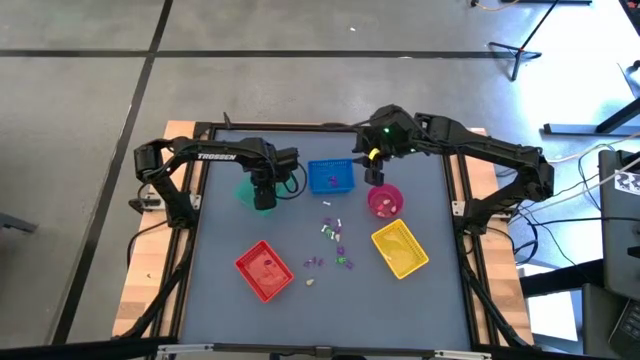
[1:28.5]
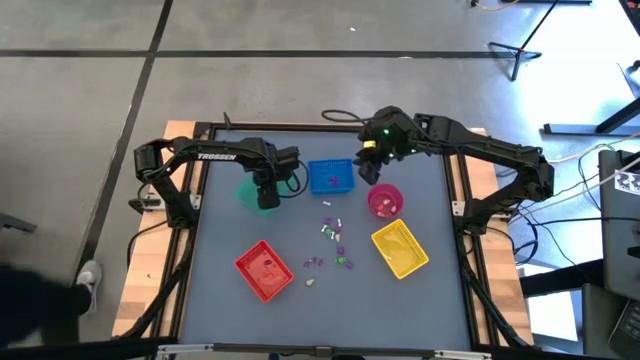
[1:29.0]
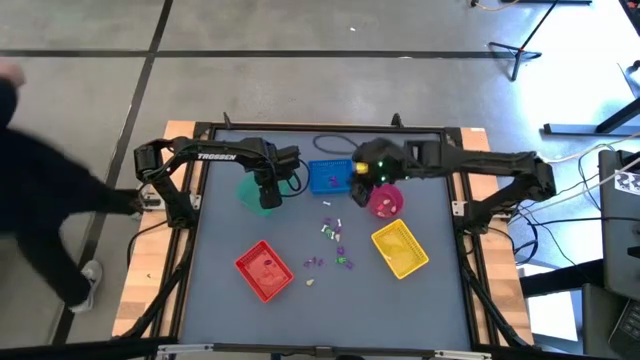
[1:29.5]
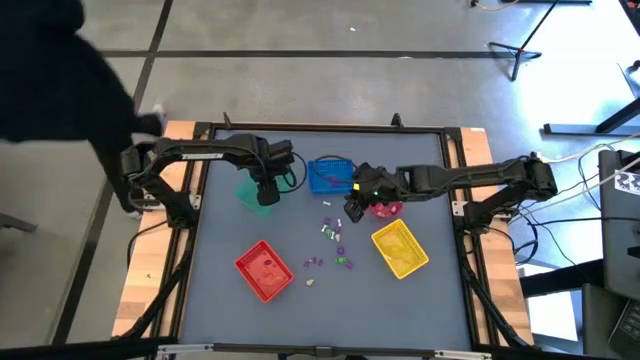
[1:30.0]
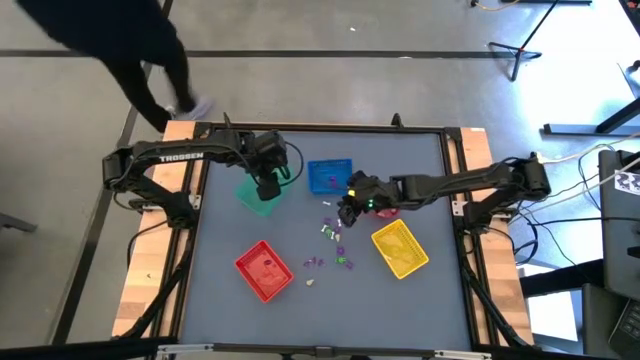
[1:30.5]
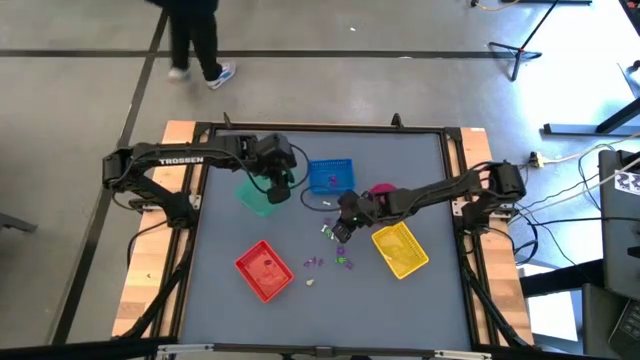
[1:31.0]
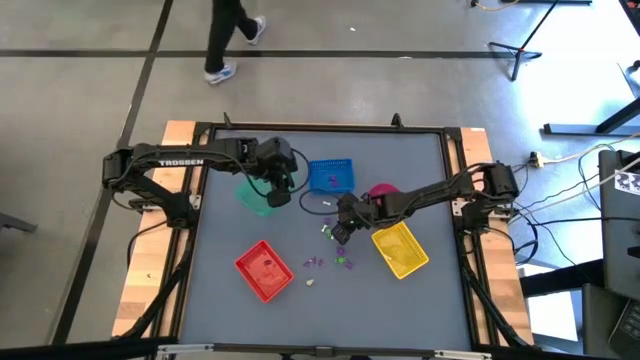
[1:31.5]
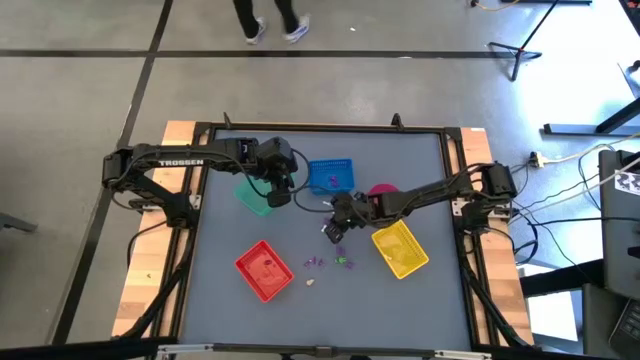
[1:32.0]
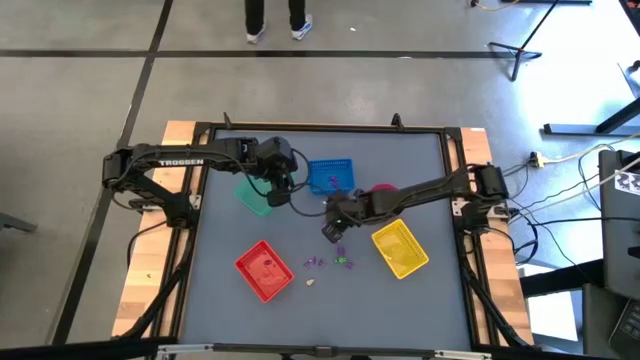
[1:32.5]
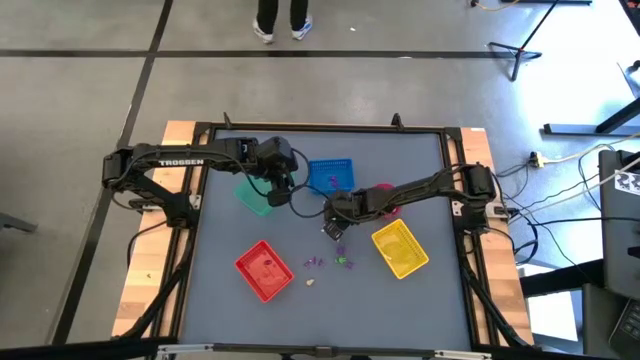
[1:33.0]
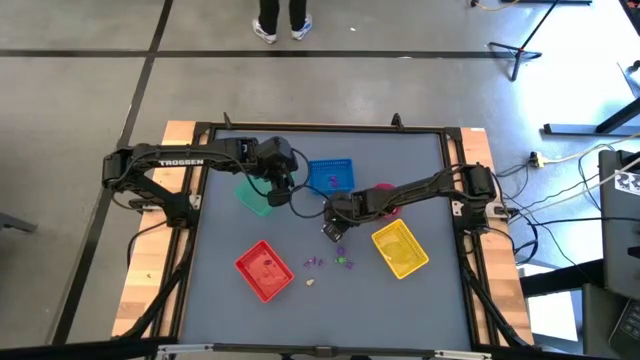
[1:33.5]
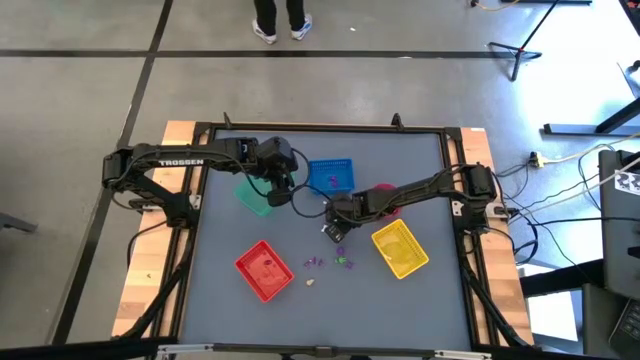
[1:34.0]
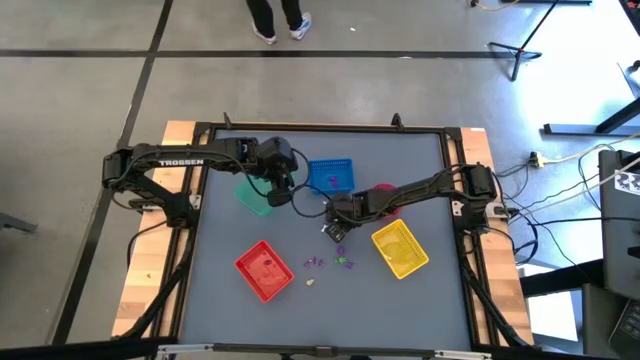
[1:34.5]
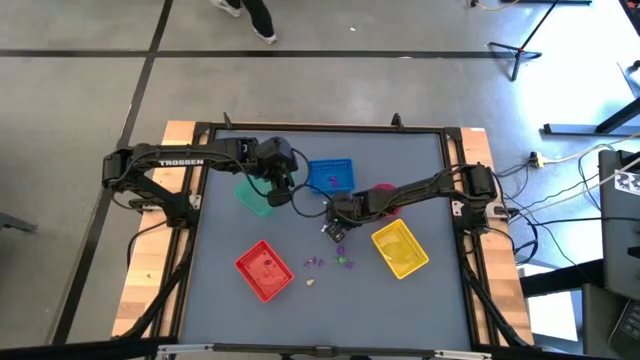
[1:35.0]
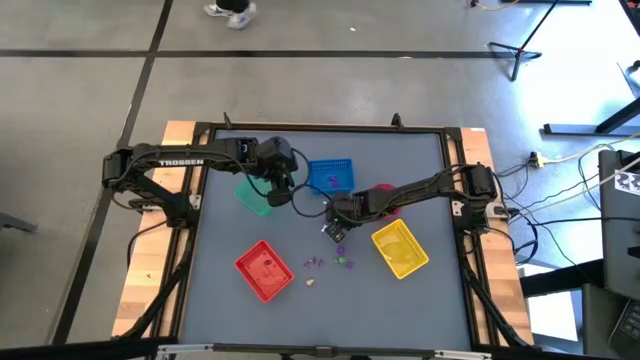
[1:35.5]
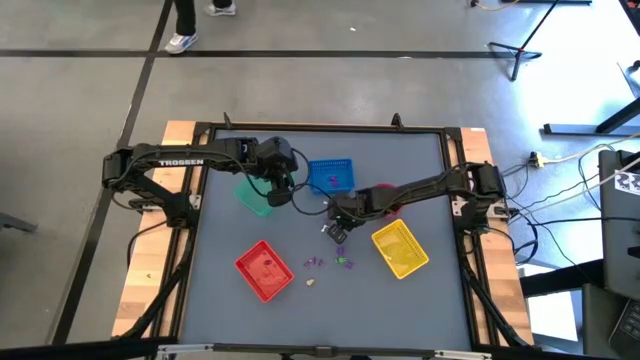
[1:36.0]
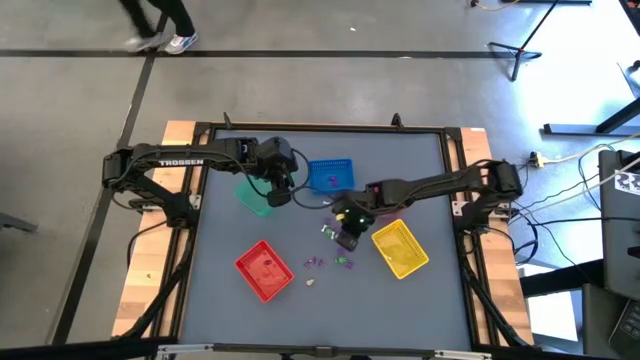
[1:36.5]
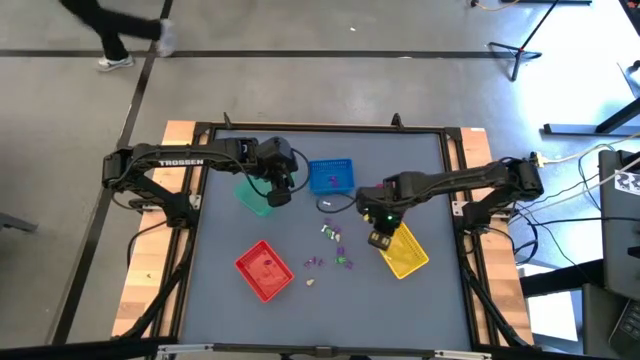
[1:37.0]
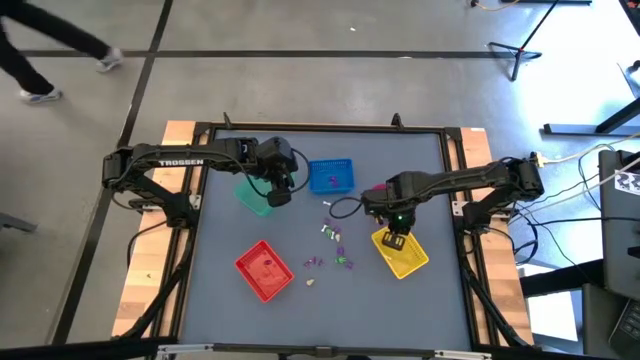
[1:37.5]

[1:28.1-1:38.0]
Task: Sort Halloween decoration
Put the white bone toy into the yellow bin

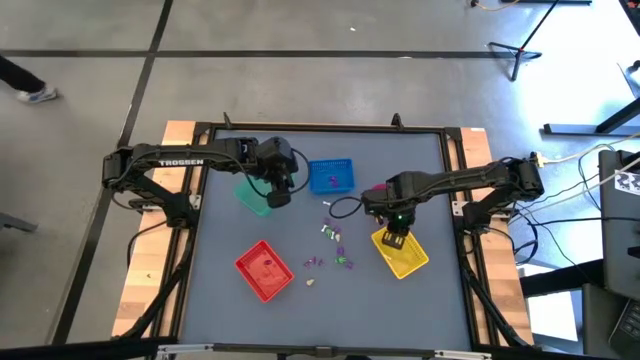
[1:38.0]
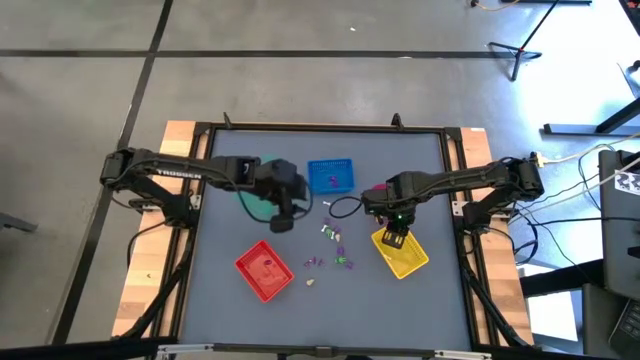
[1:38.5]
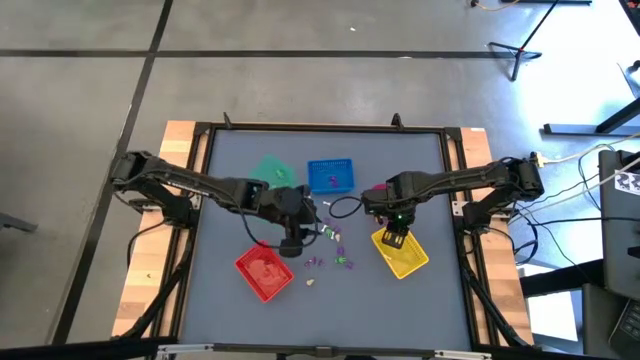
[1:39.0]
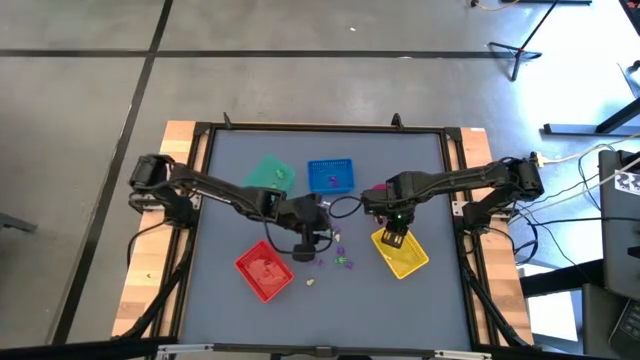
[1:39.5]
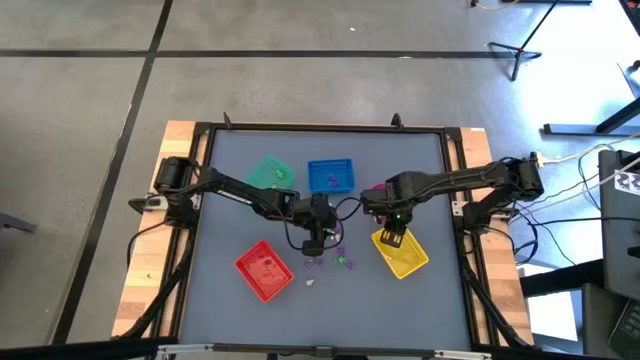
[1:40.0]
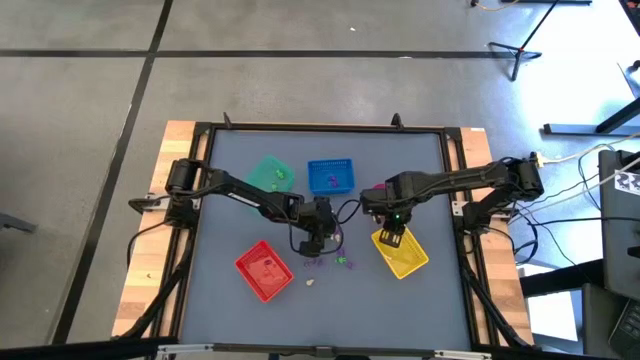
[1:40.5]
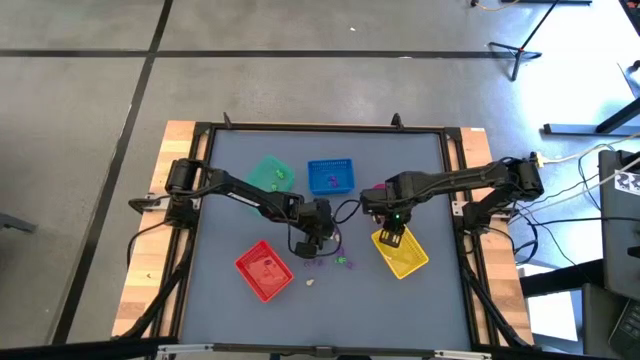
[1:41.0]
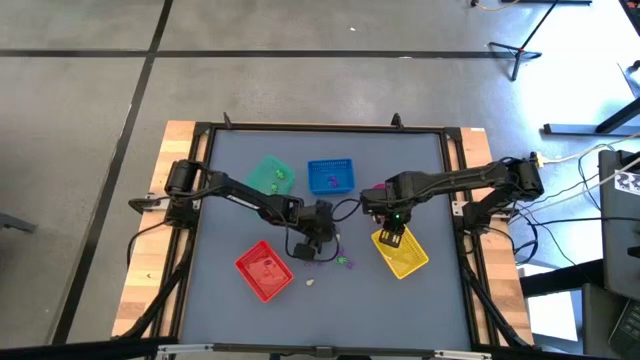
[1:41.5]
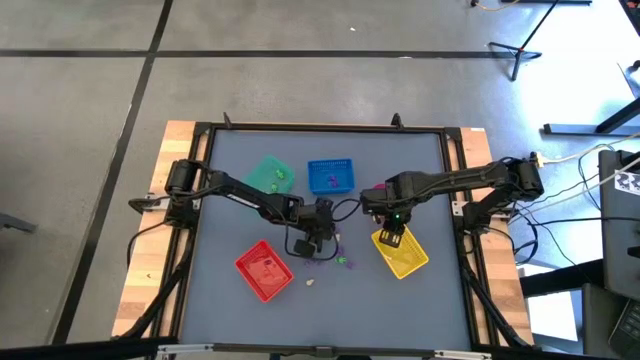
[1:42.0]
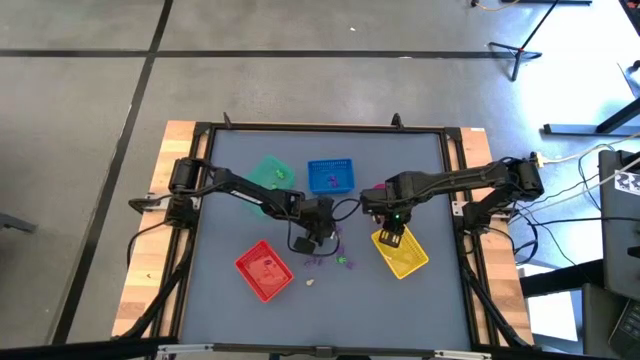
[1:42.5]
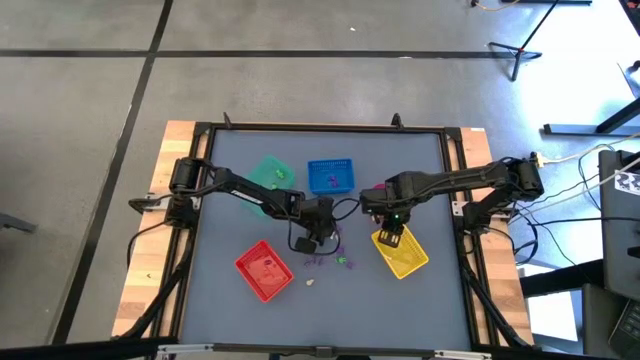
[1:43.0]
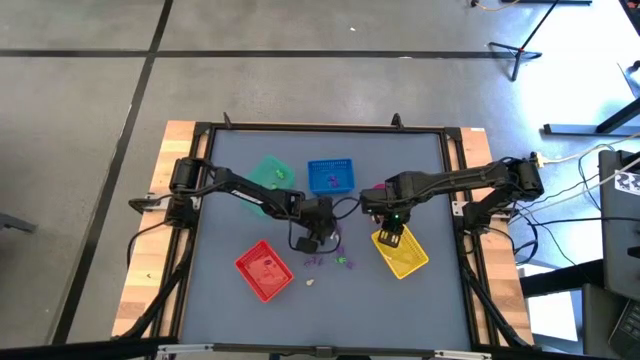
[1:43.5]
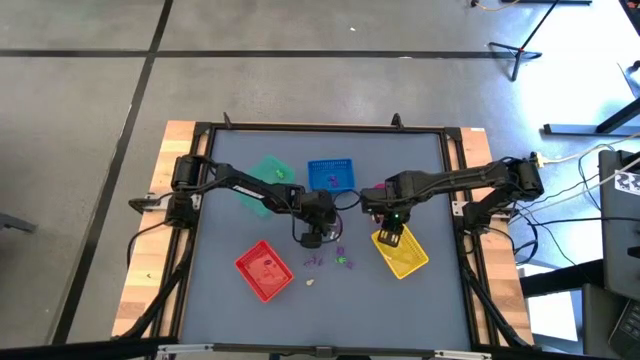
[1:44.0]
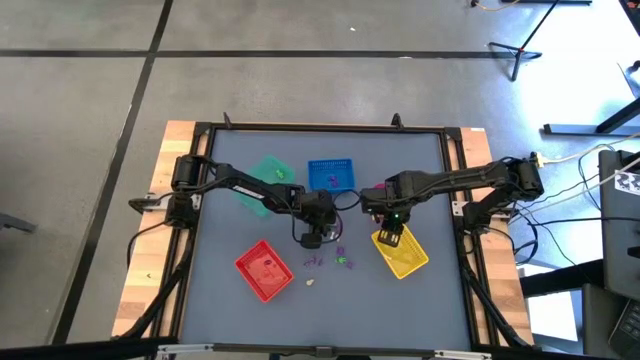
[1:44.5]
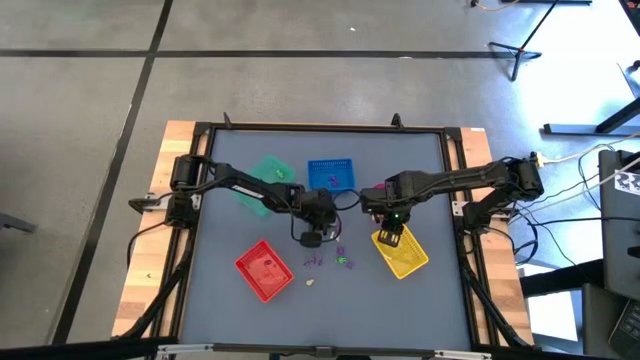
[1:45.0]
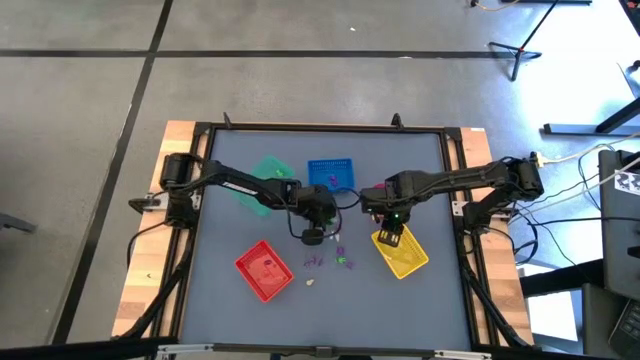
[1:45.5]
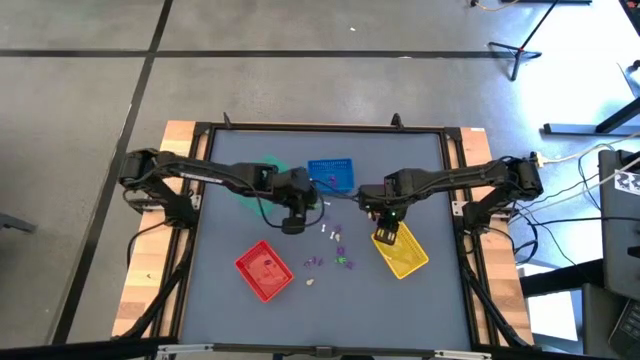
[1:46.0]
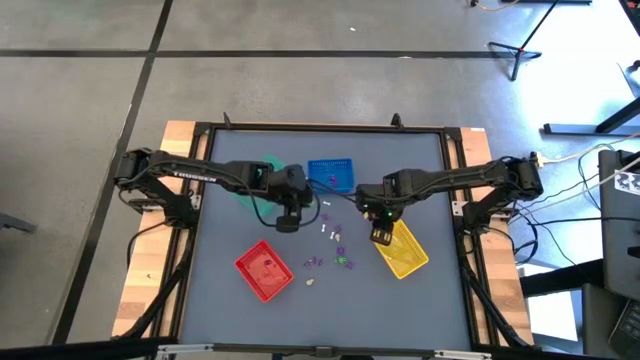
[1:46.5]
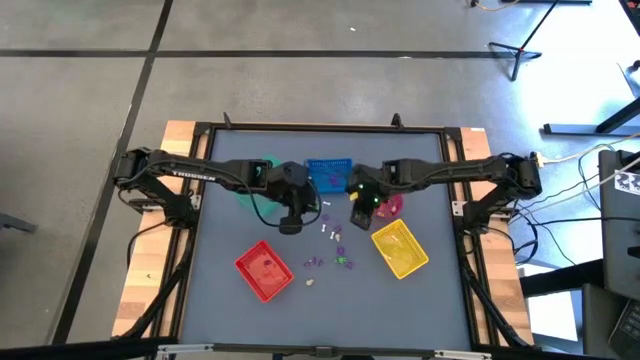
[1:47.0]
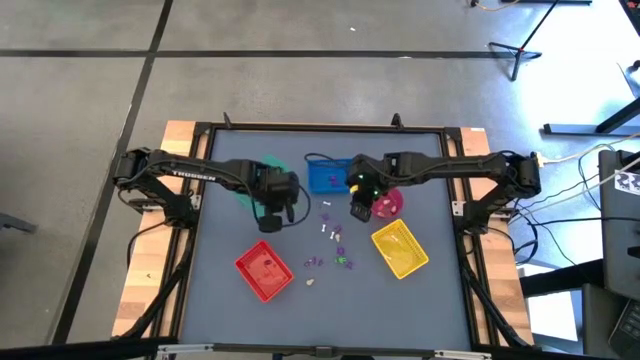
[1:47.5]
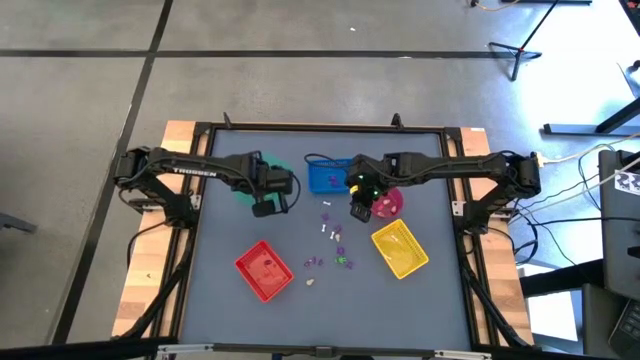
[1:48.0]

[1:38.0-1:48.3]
Put the green skeleton toy into the green bin

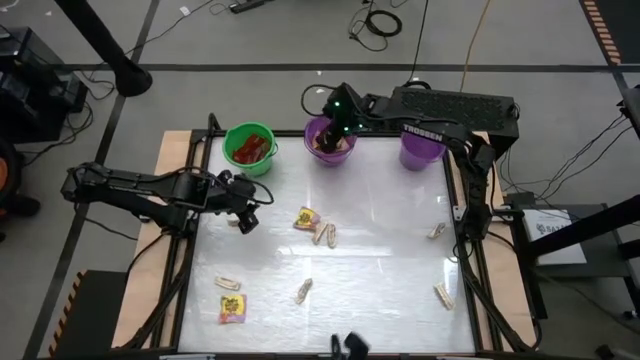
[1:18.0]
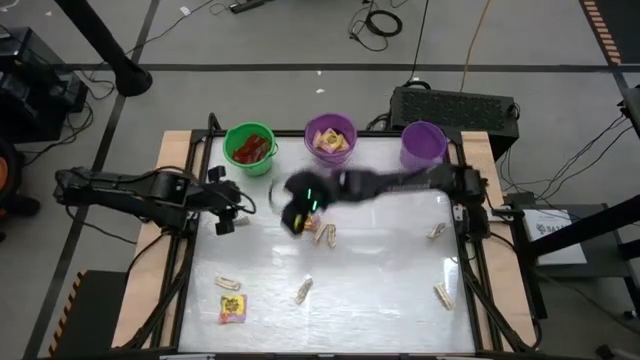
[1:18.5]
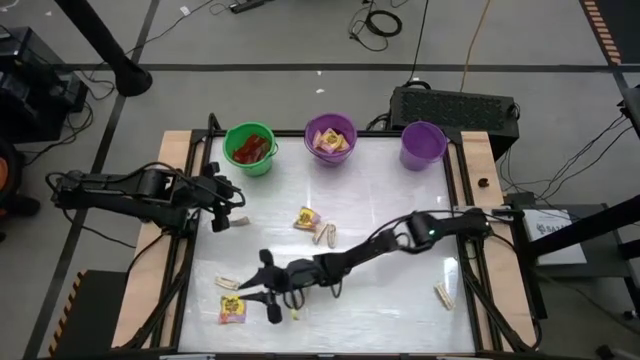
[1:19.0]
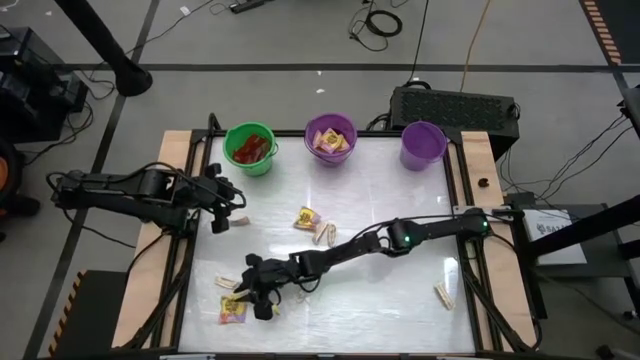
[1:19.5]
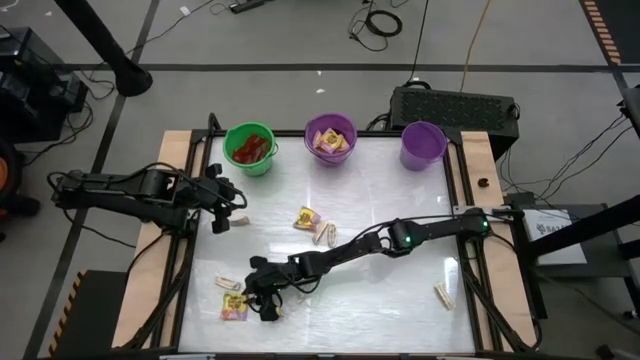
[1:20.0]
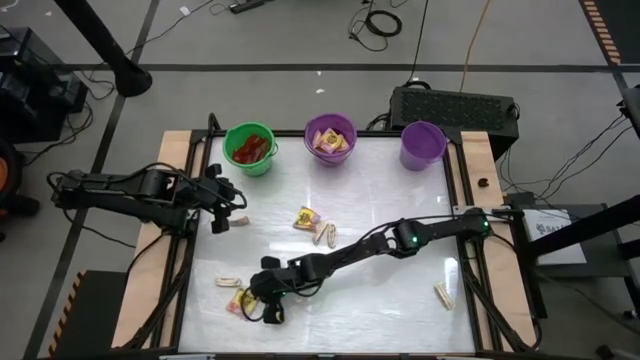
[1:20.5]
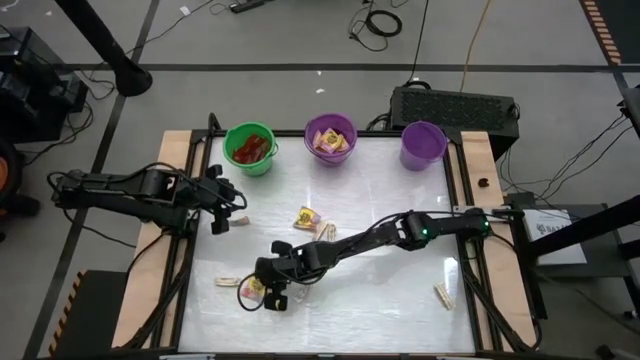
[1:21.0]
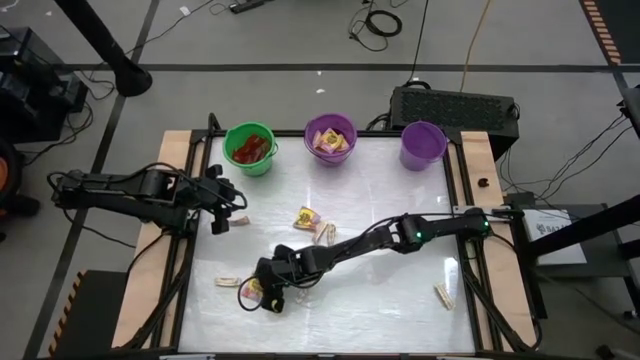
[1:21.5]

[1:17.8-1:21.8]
Task: Sort candy by brand, put in halloween buckets
Put the yellow candy pack in the left purple bucket
